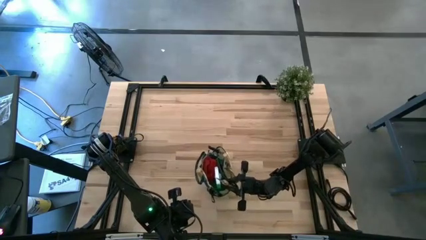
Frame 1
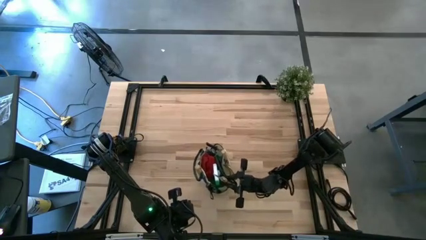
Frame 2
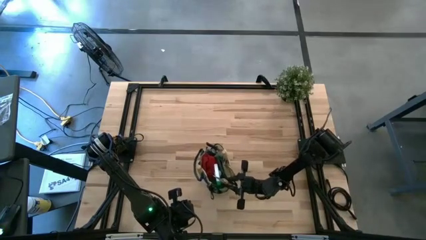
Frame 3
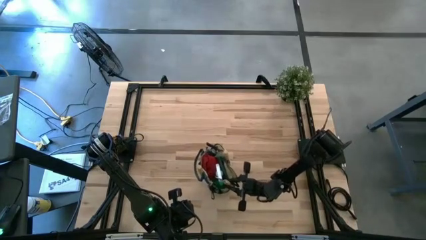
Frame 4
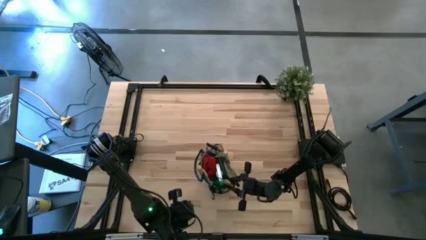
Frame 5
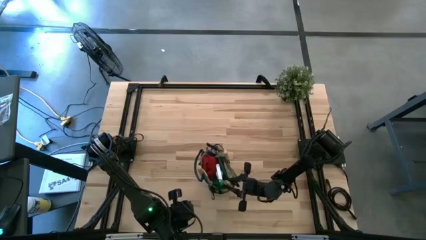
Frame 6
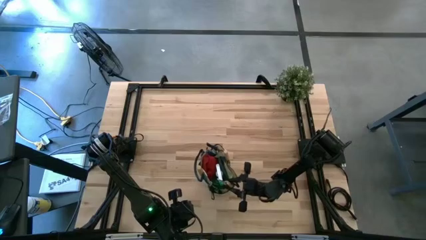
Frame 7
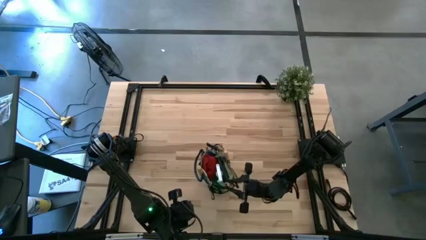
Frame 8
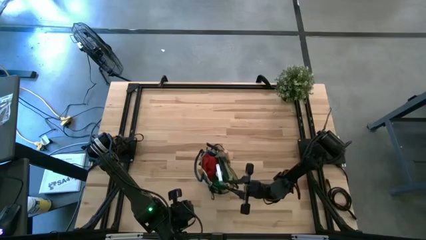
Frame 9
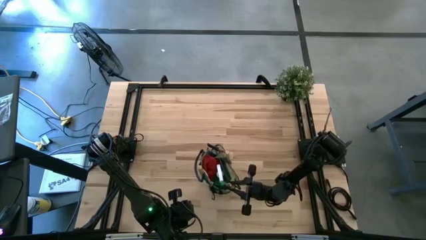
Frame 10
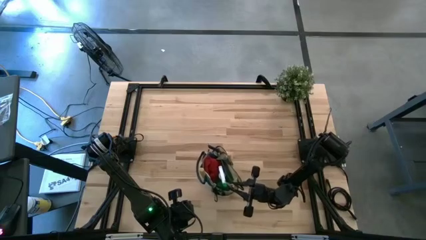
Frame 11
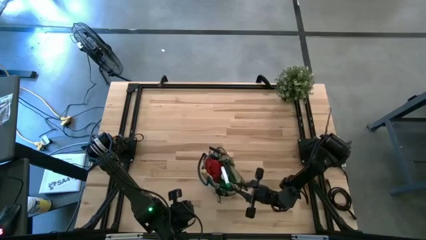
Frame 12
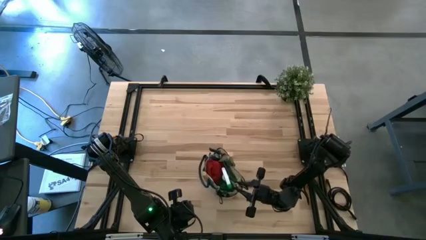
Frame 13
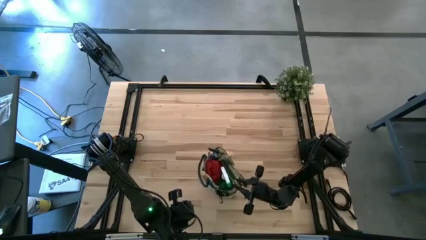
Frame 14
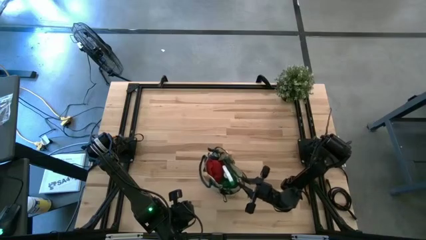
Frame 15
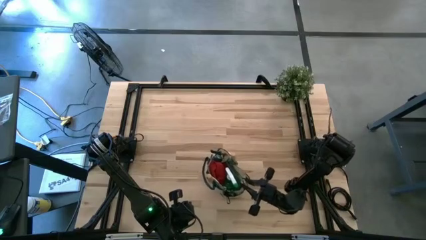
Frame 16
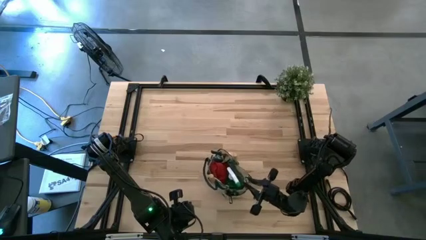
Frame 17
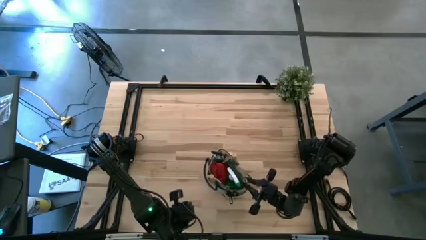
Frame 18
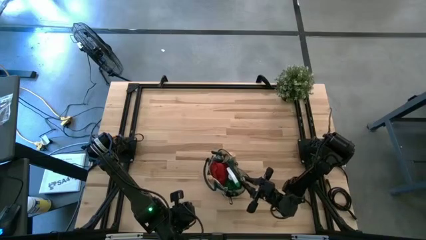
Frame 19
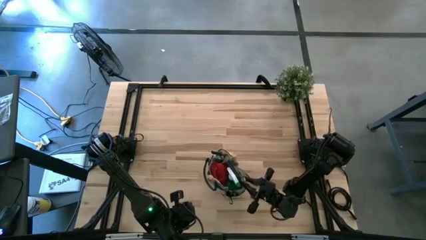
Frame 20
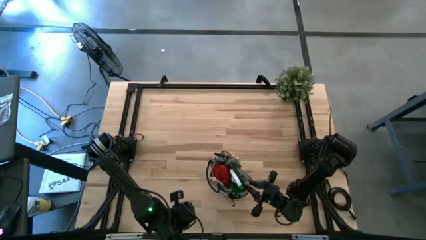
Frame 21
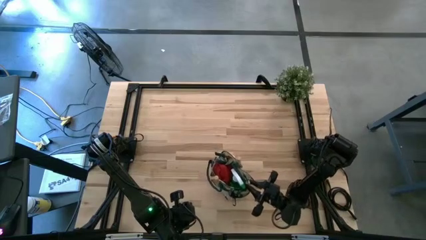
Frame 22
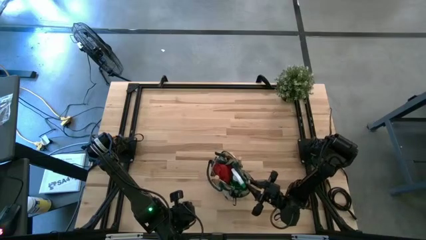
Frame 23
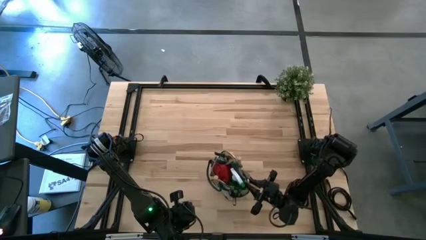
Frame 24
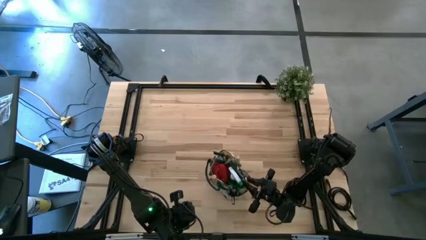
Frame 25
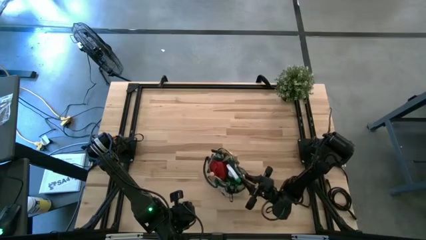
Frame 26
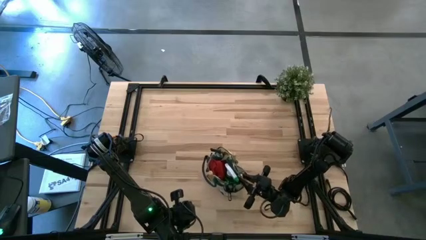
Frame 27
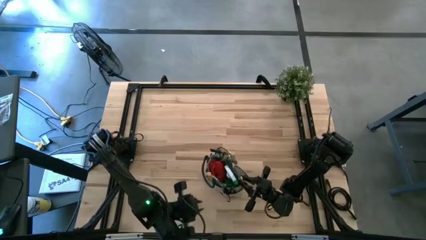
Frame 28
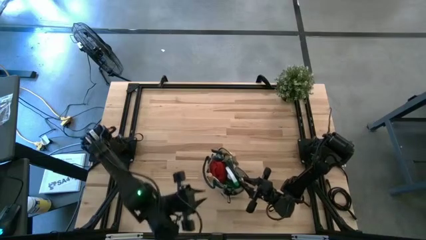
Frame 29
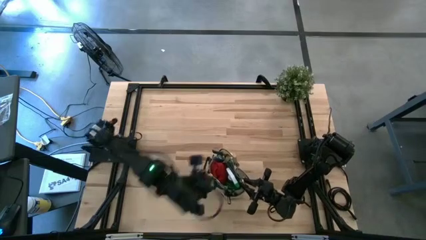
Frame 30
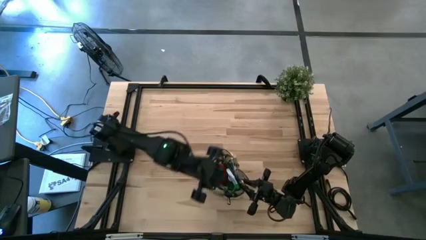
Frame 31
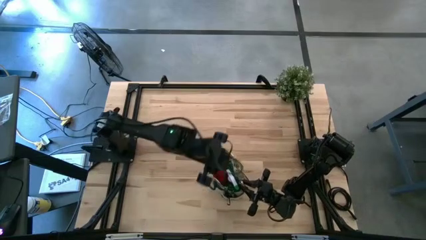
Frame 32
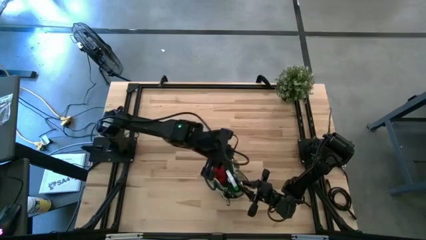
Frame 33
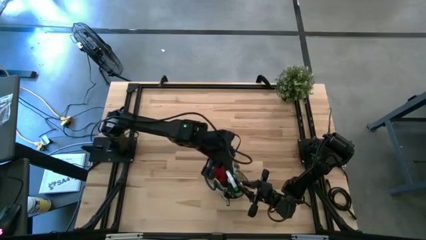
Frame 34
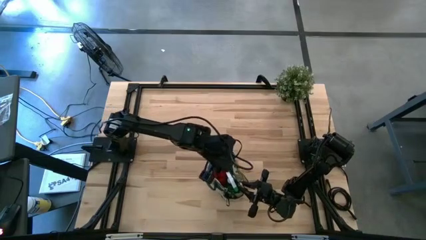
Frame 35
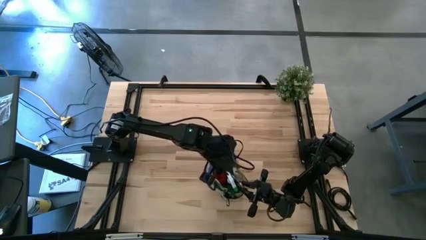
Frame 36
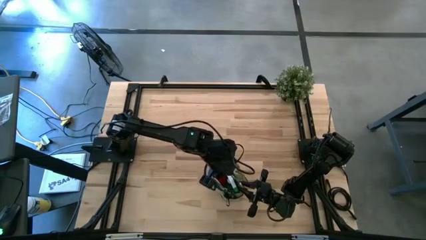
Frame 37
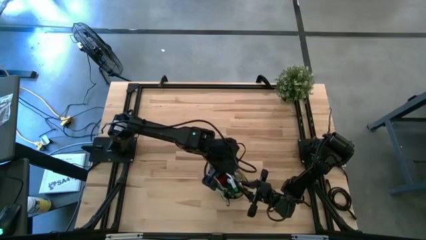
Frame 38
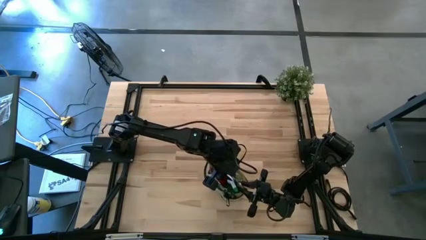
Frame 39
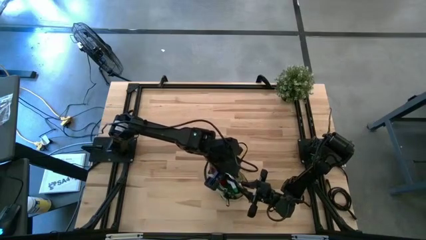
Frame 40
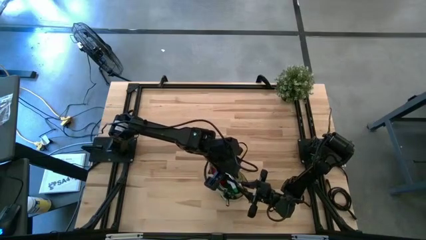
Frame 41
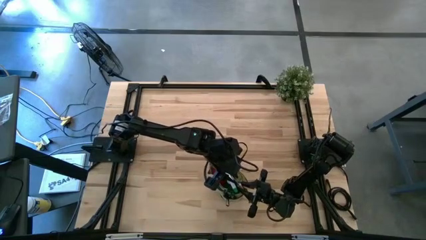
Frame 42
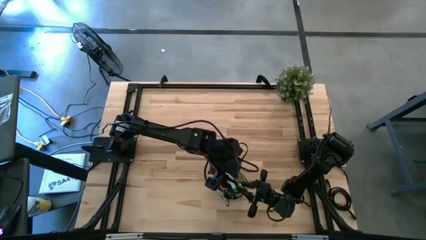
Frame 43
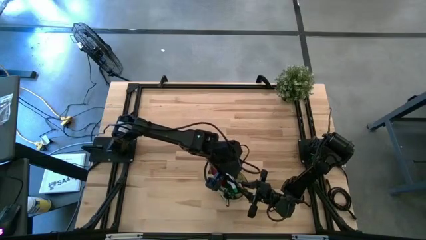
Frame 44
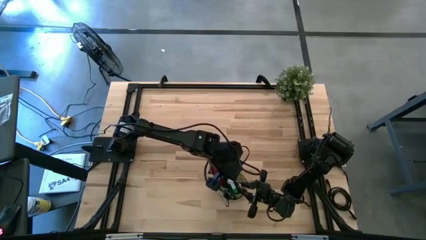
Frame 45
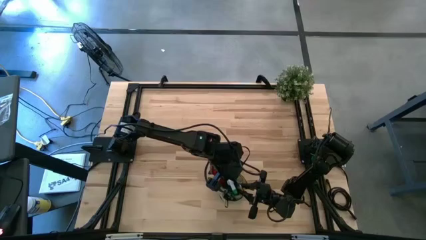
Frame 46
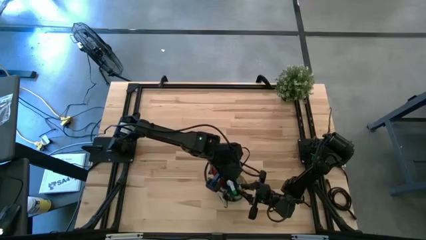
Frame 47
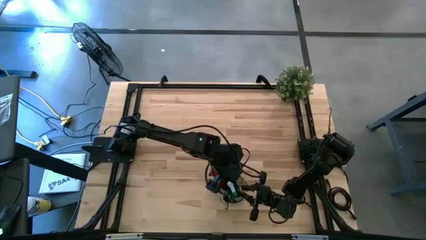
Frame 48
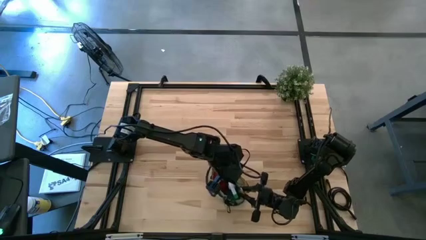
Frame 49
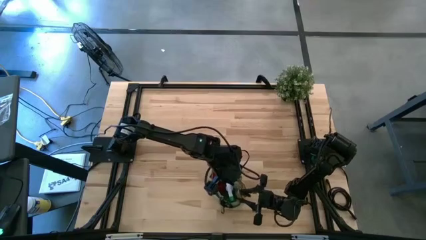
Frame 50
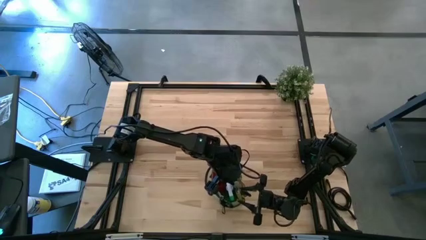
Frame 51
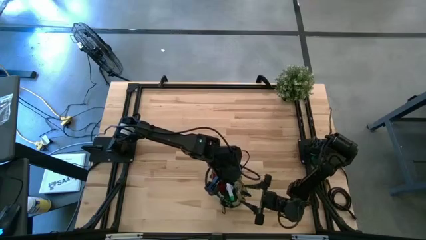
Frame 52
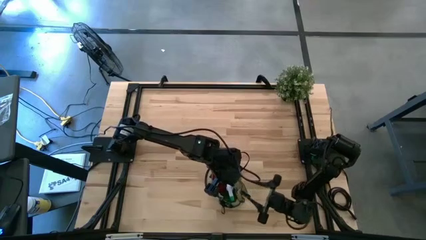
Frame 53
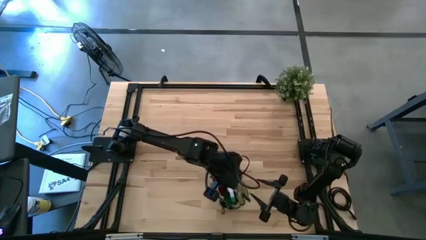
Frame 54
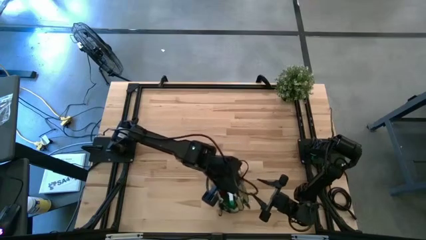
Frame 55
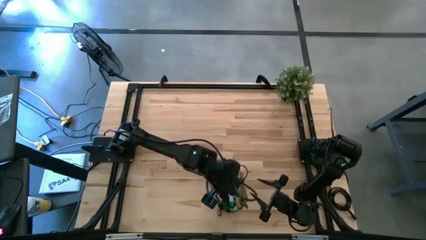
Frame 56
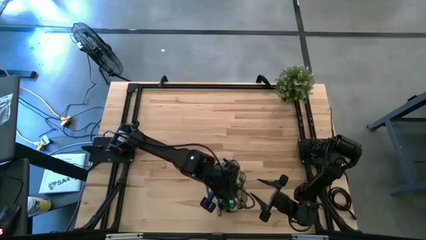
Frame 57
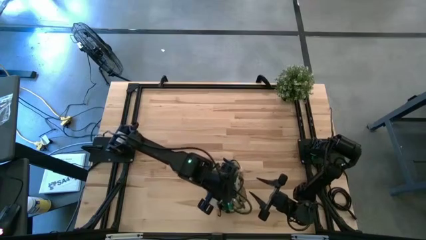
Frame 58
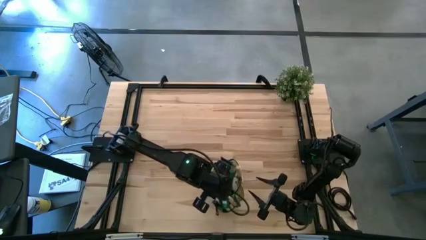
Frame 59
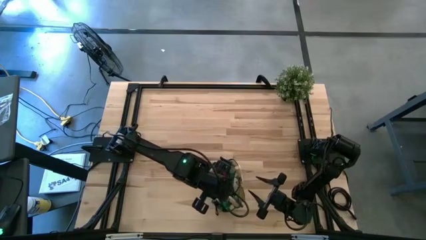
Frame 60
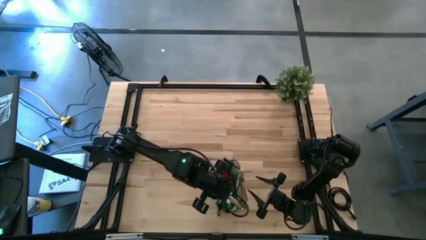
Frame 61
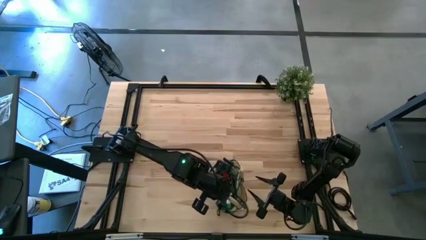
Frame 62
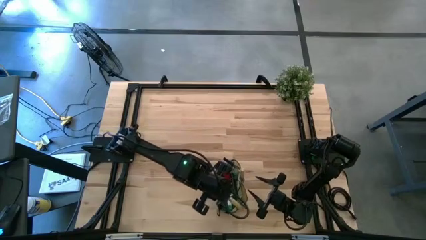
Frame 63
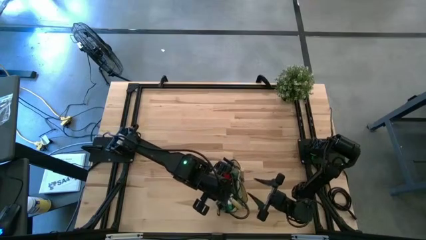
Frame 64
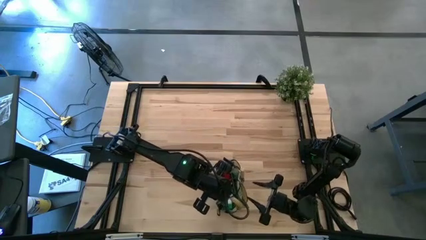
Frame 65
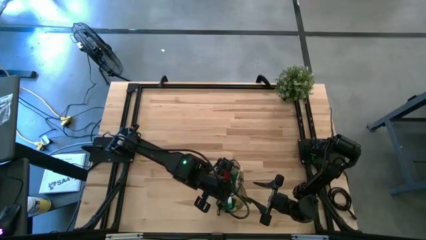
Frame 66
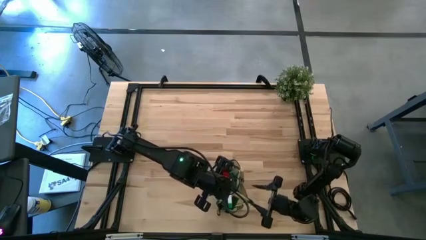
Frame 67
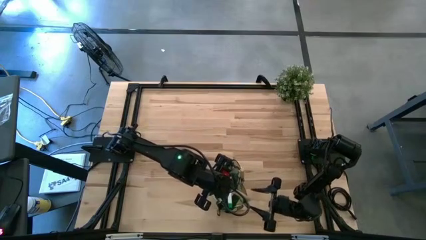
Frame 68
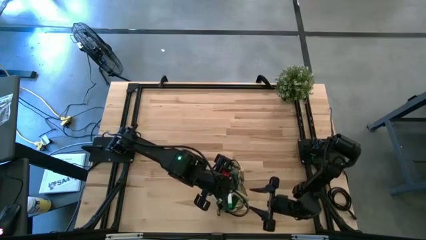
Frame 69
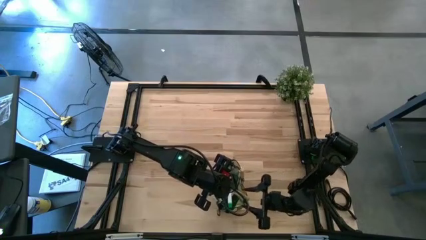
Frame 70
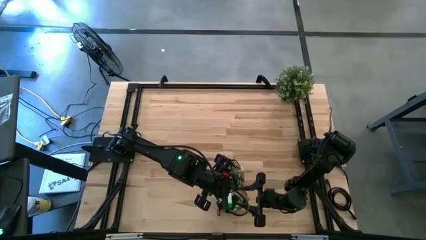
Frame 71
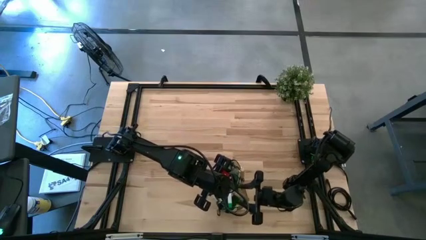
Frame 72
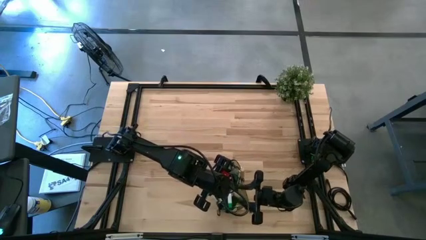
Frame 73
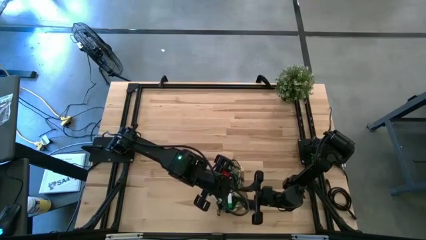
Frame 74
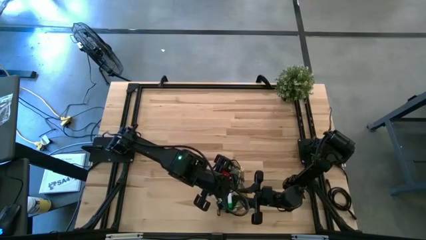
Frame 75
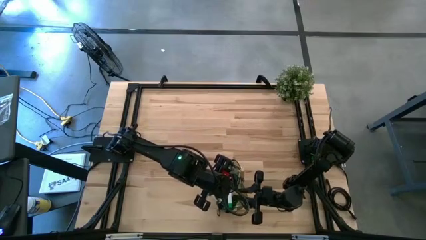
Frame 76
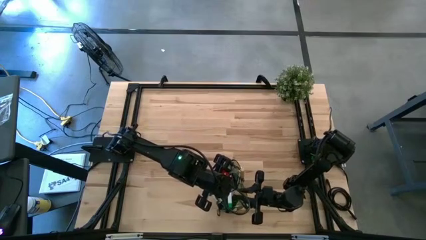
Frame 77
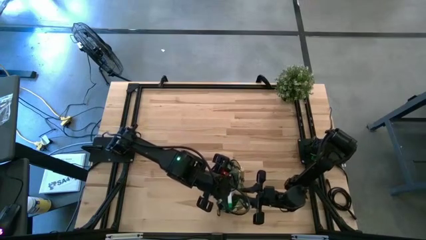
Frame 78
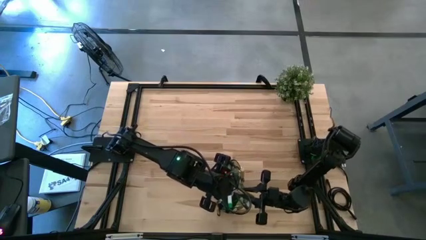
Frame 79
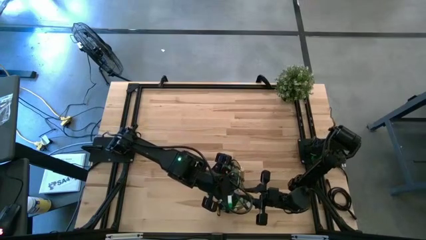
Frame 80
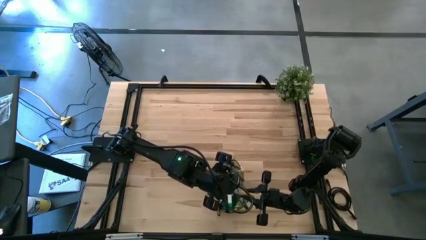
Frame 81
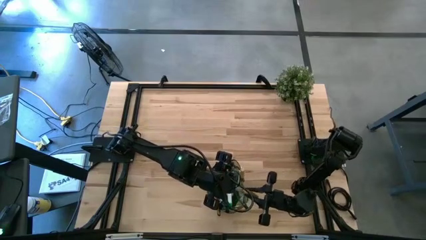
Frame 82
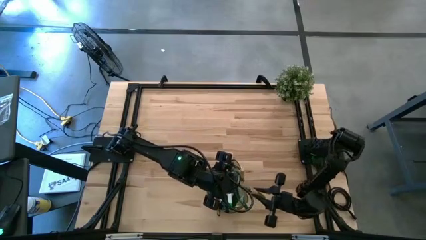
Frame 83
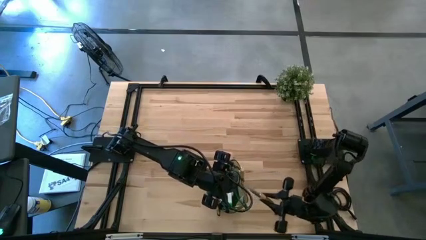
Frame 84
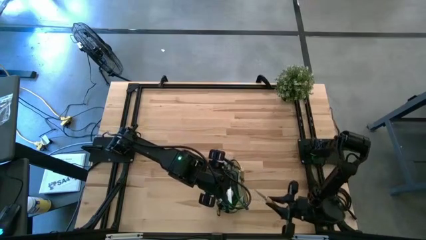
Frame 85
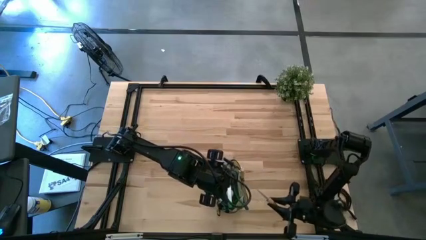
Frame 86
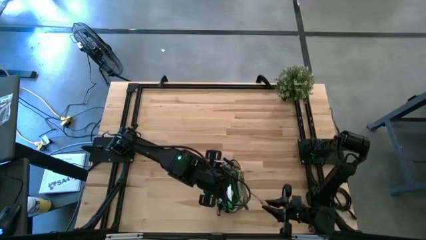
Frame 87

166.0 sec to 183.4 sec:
Task: Pick & Place Garden tools in Gardening bag
Put the trowel into the gardening bag
